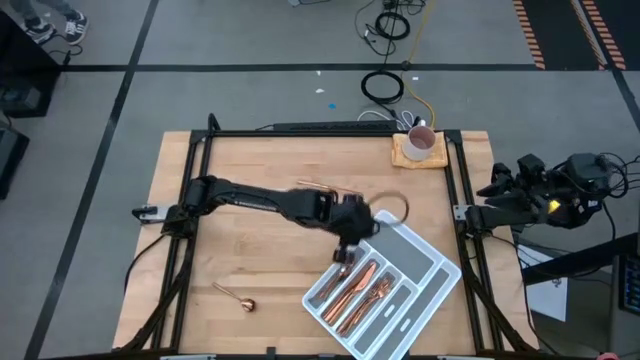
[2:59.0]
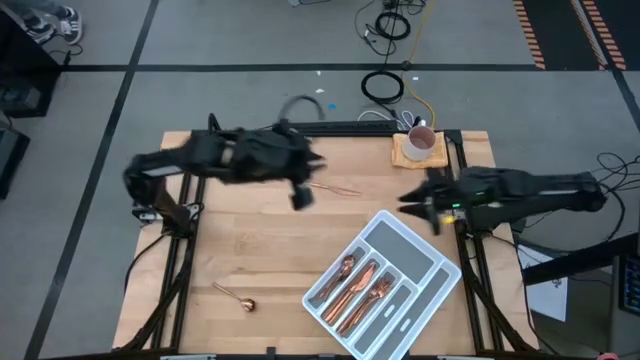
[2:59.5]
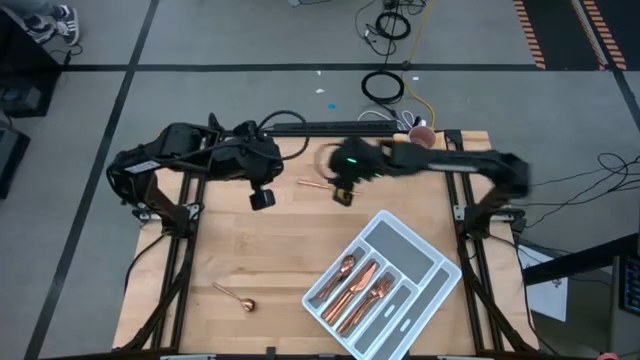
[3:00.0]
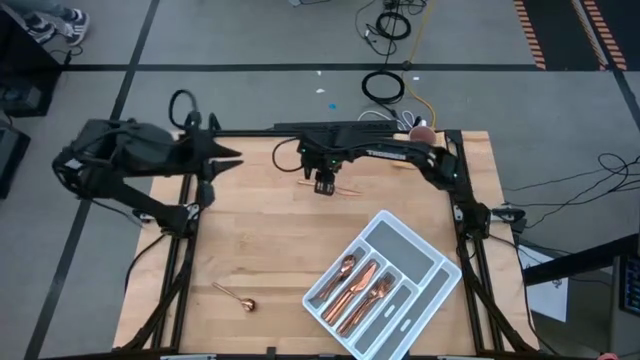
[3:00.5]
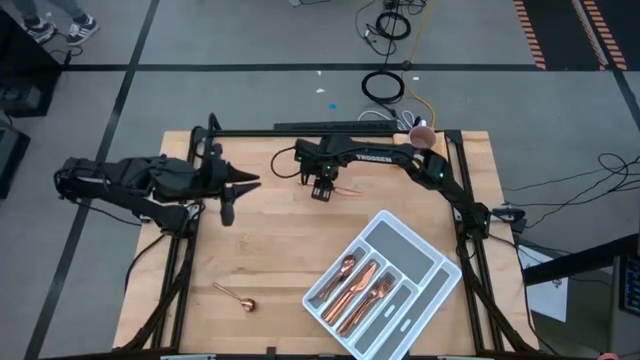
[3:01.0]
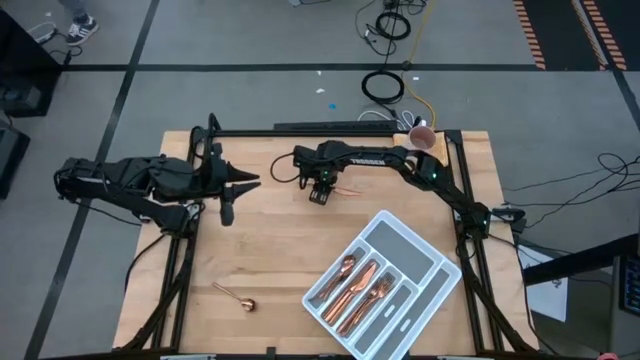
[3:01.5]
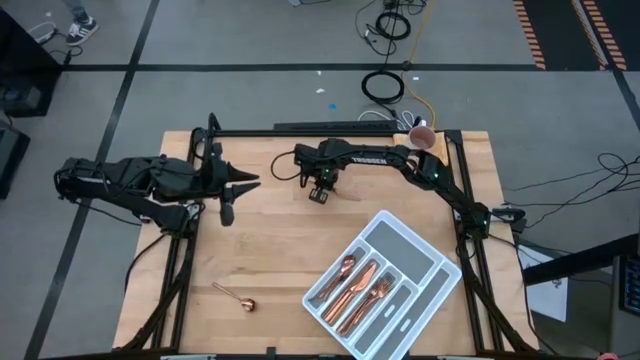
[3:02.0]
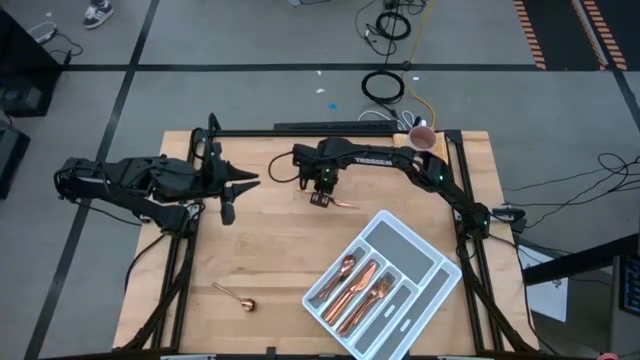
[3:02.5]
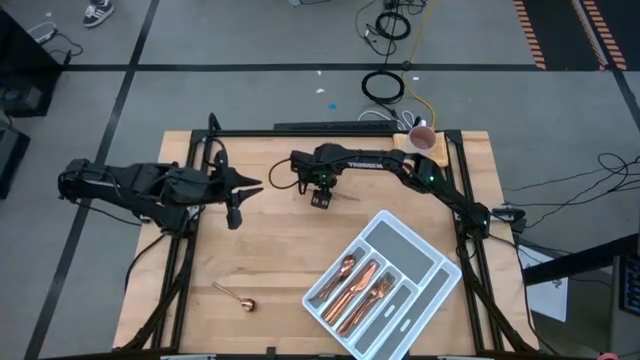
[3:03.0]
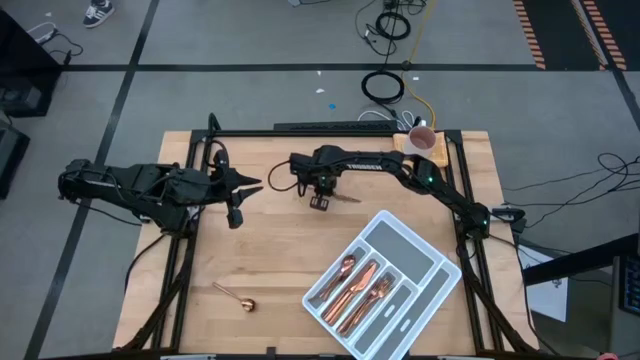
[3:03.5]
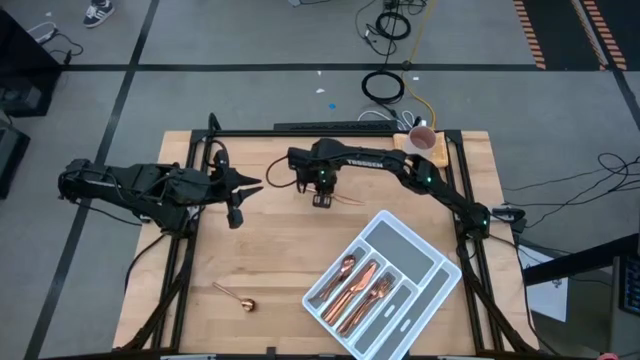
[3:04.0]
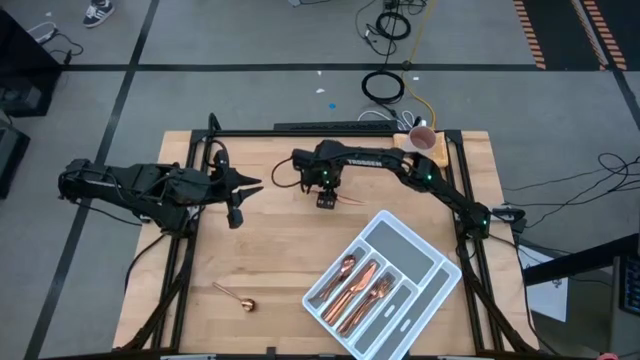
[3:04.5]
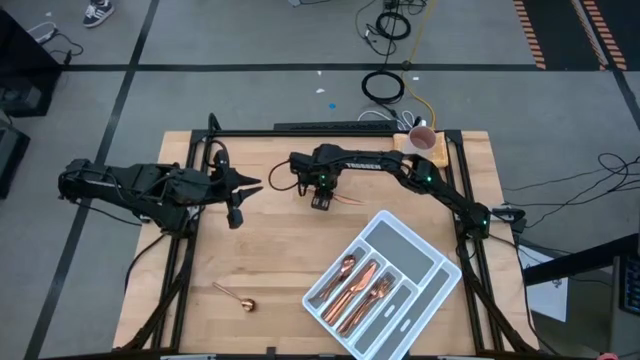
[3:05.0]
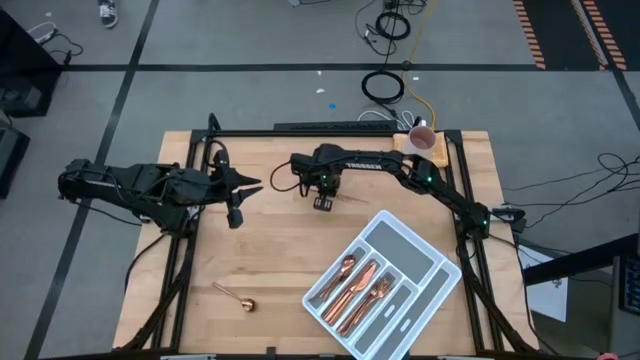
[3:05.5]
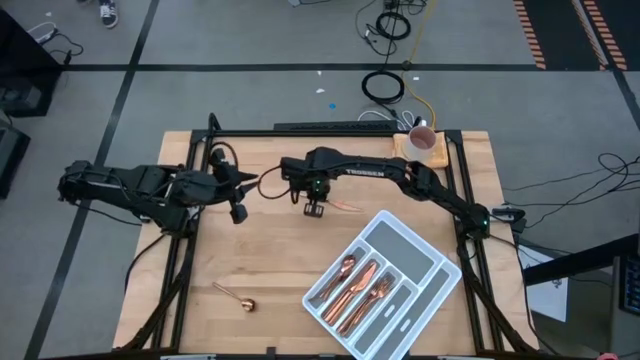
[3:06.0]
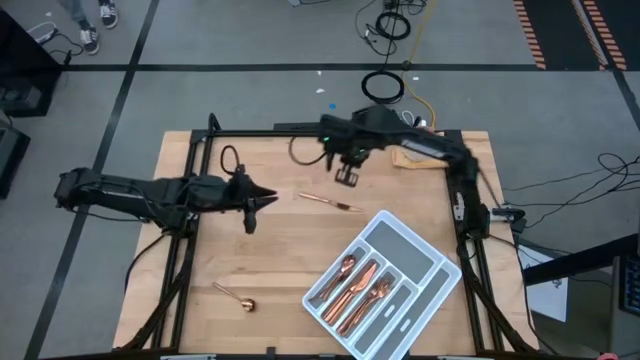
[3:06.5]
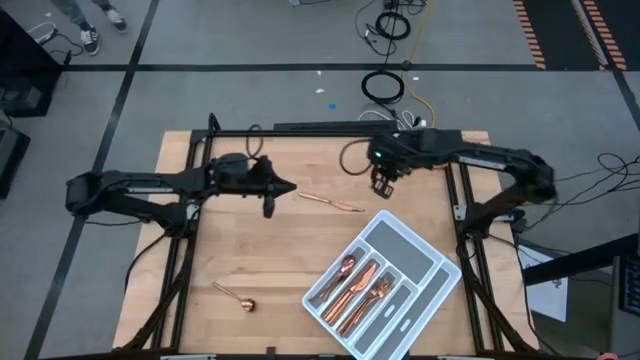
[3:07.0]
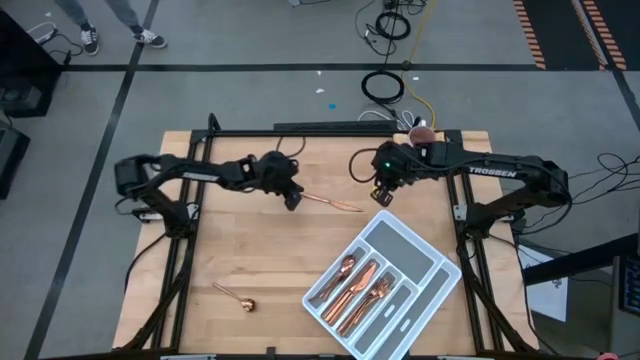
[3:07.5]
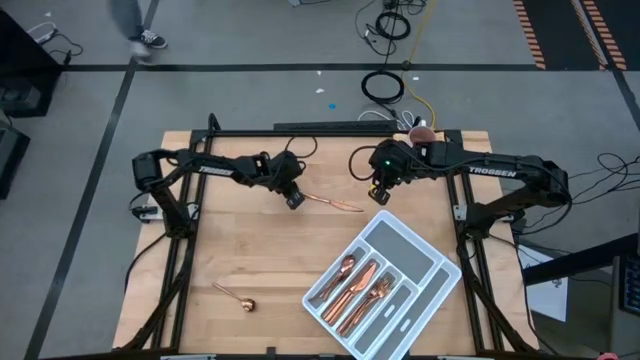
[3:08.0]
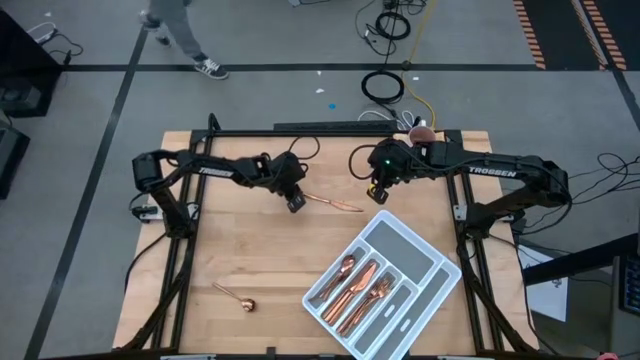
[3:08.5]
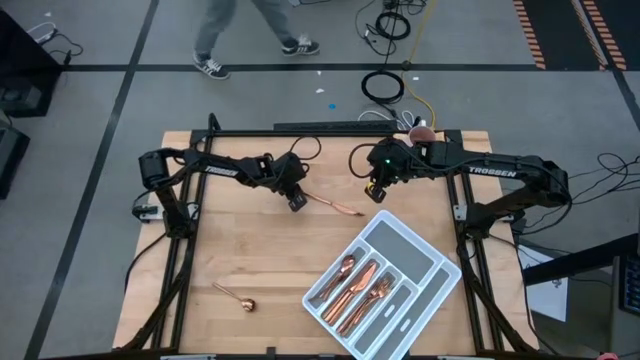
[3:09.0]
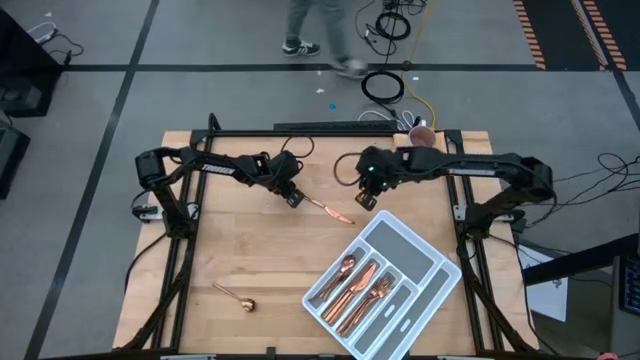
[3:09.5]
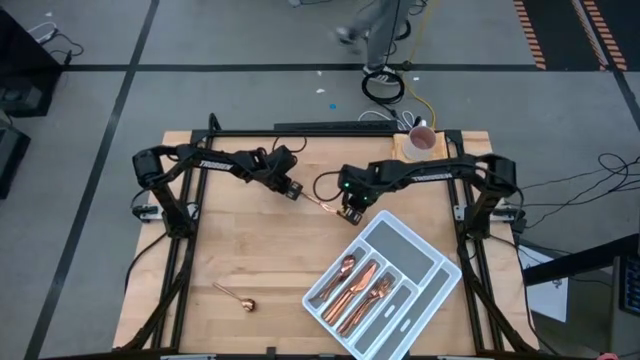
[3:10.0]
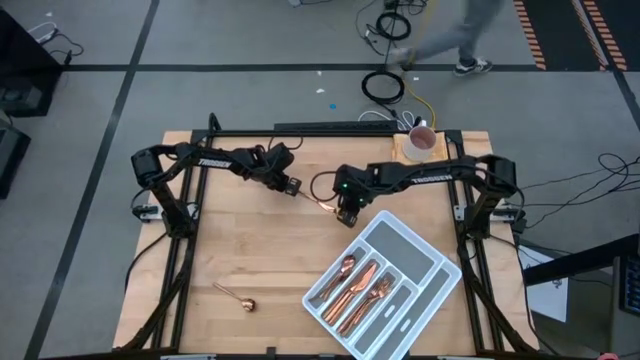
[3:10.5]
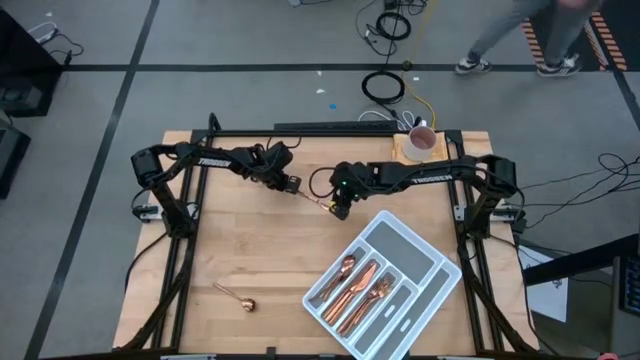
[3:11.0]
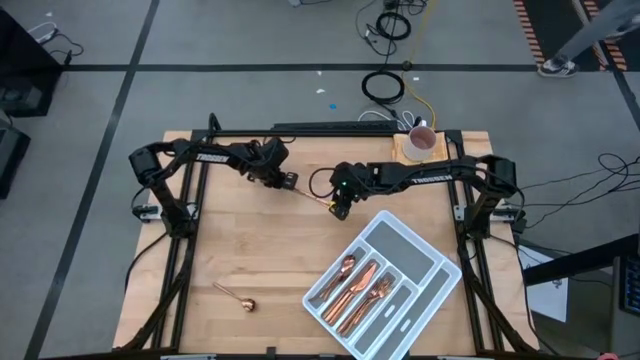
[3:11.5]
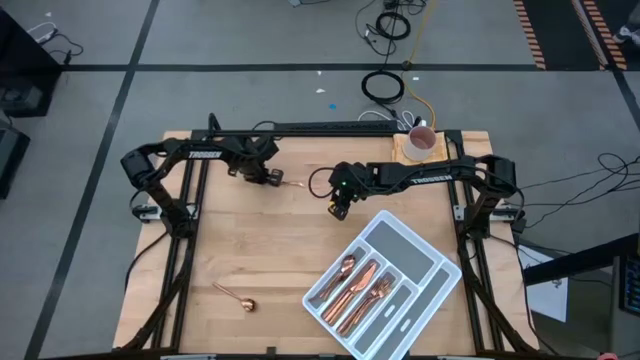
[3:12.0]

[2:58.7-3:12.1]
Task: Sort silverware
Put the gold table knife into the cutlery tray with the other gold table knives

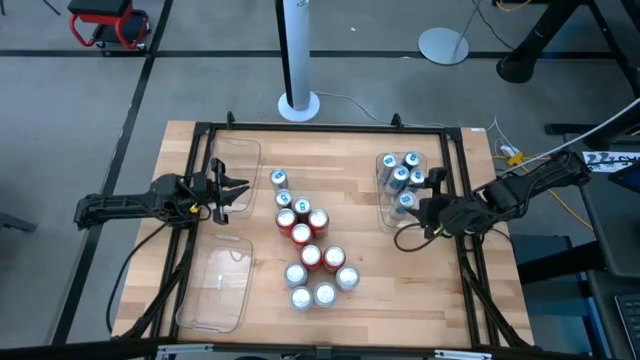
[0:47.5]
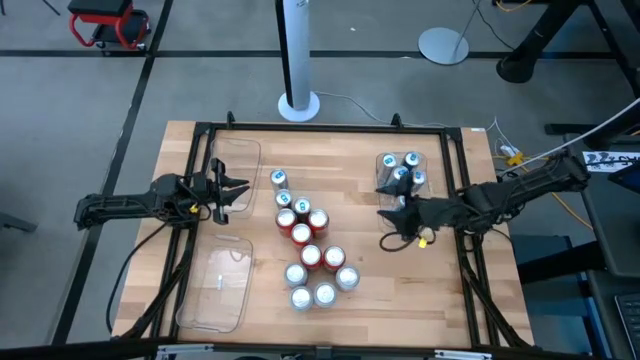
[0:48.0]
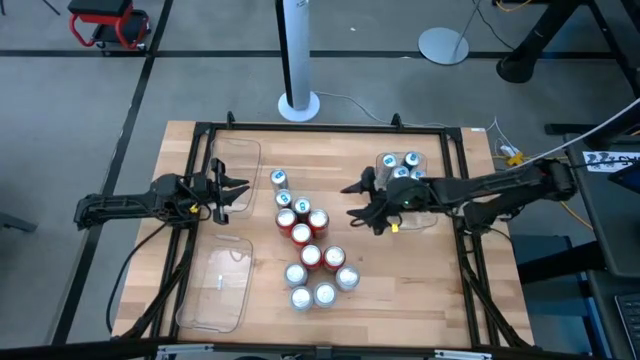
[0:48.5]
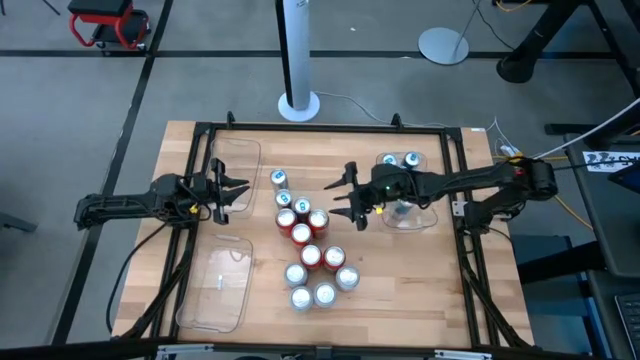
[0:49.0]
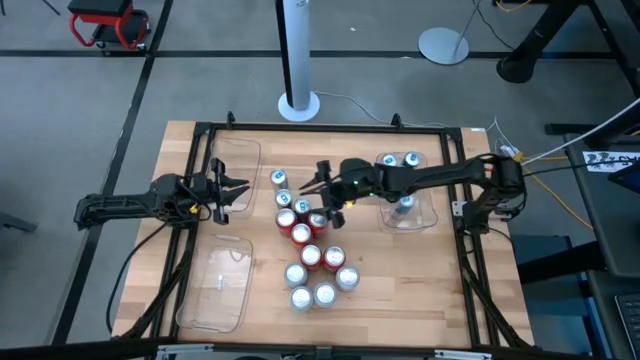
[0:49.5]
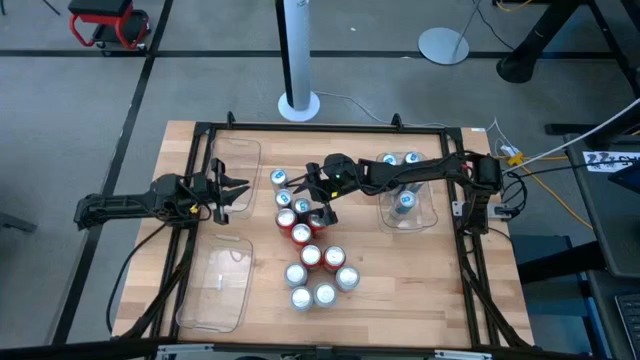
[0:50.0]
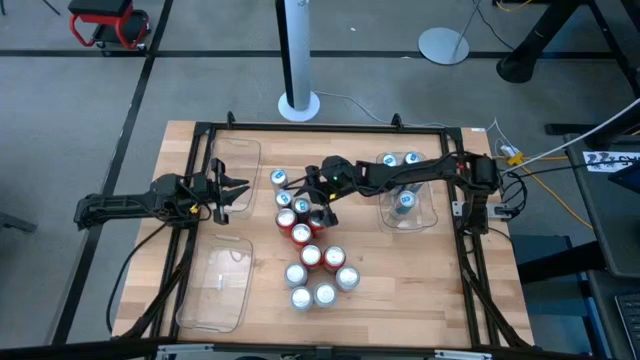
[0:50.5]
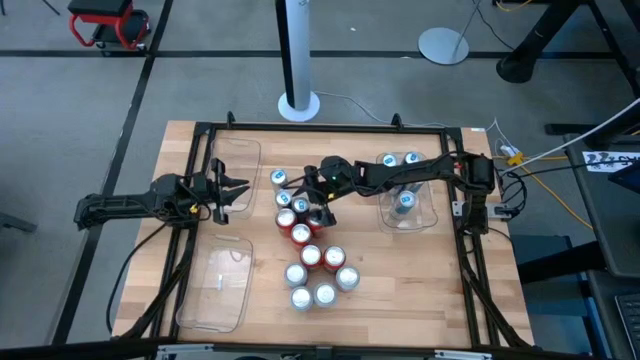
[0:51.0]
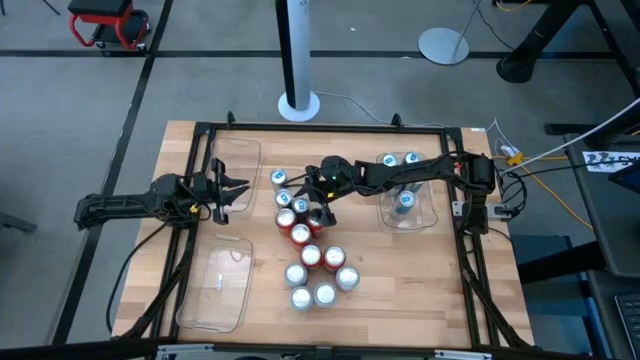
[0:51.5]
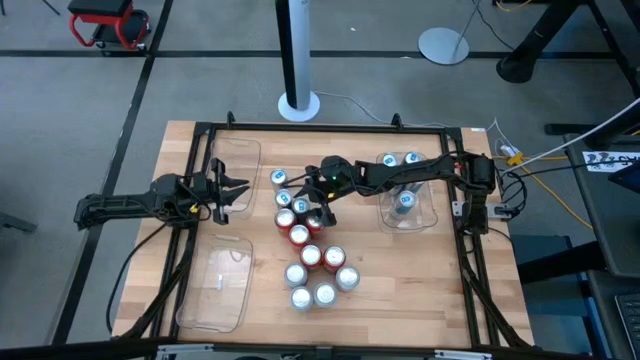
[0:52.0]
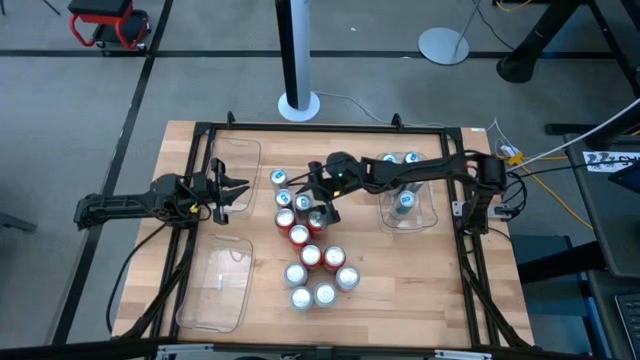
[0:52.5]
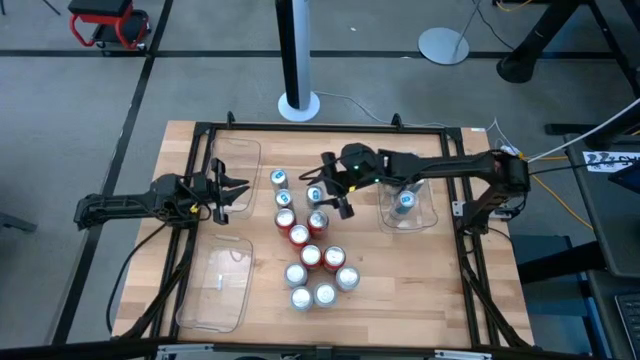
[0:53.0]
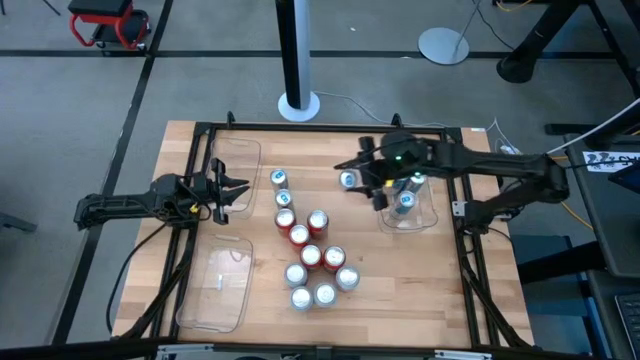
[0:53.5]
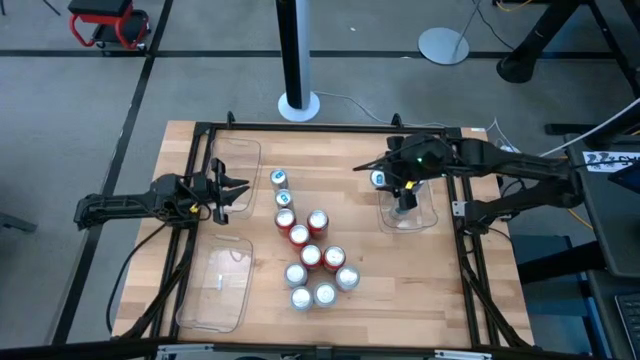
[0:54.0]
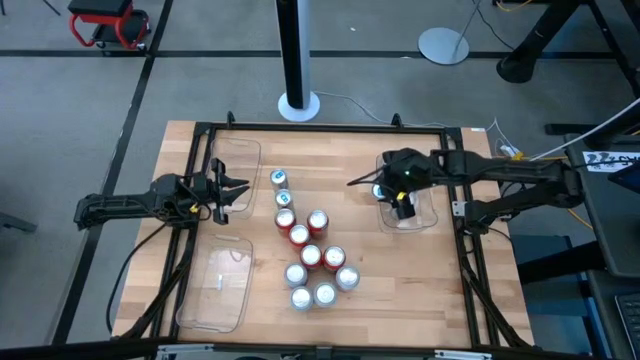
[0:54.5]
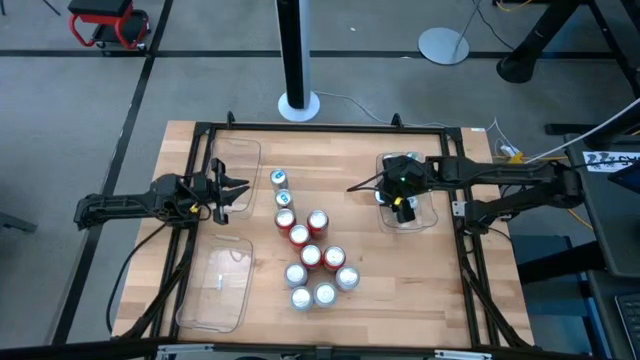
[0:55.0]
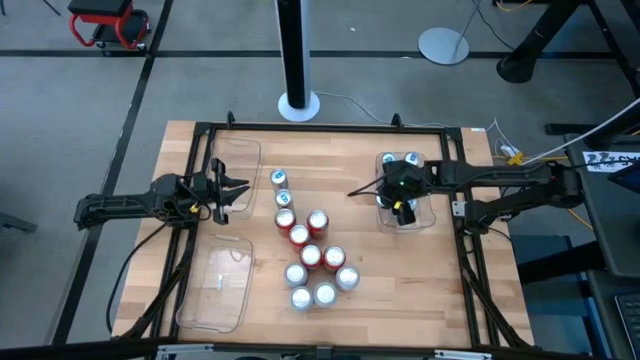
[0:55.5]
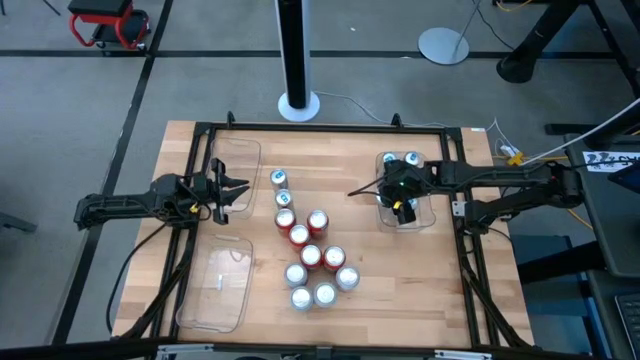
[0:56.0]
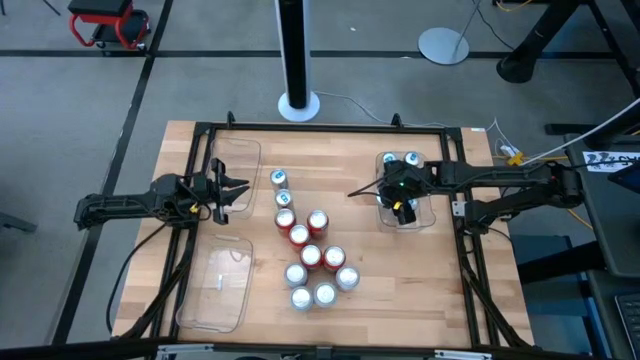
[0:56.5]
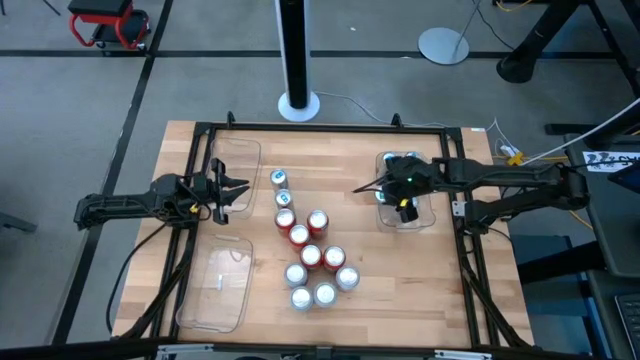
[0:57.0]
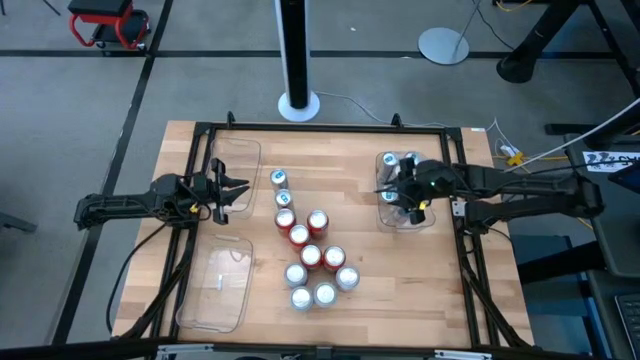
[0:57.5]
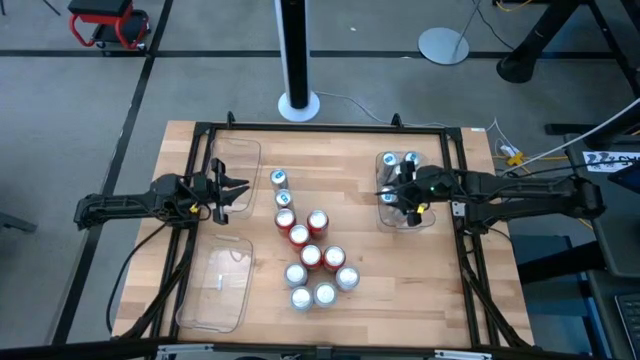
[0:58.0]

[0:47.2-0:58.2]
Task: Sort soda cans
Put the blue soda can into the middle right transparent bin
